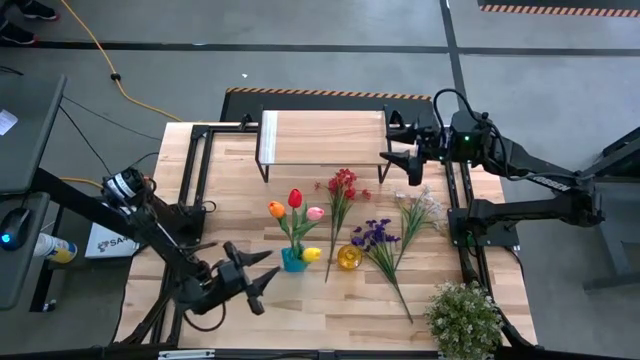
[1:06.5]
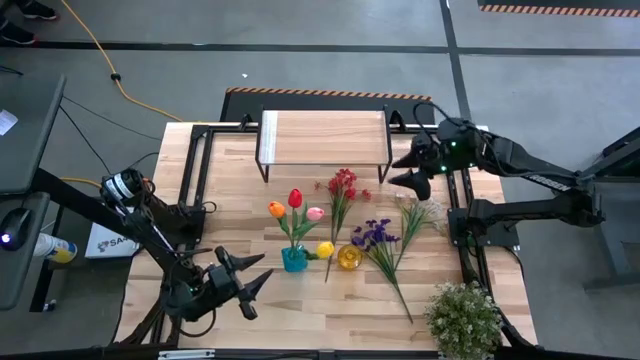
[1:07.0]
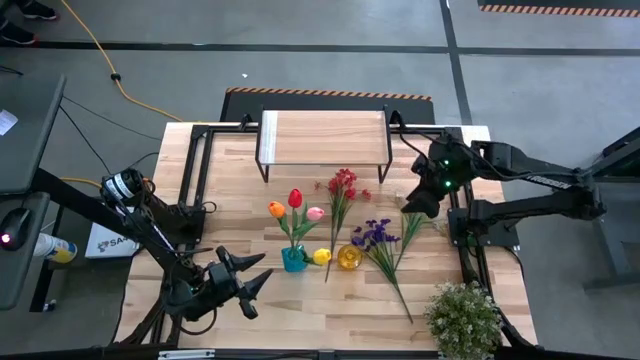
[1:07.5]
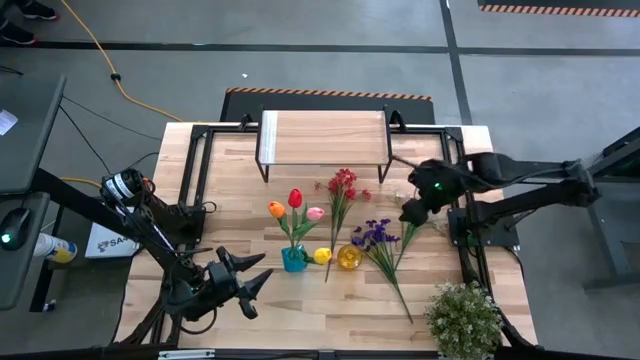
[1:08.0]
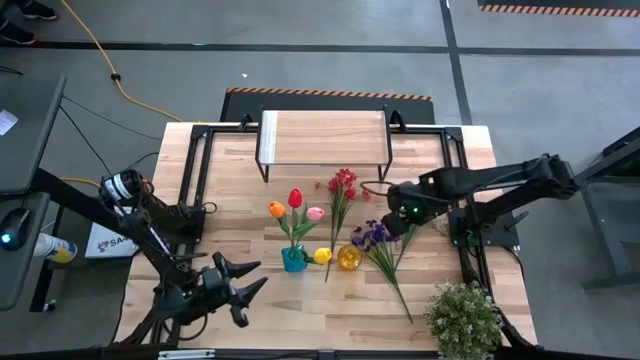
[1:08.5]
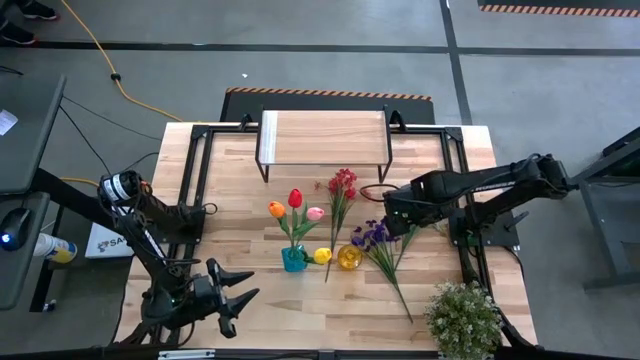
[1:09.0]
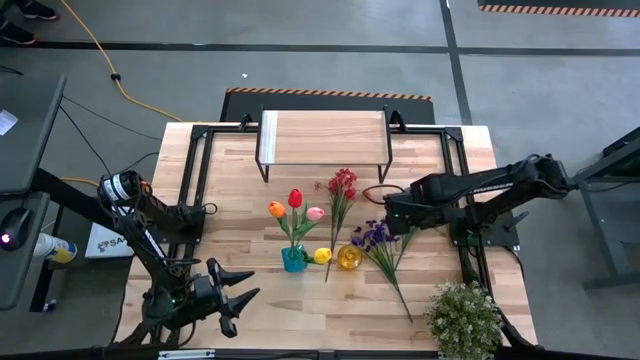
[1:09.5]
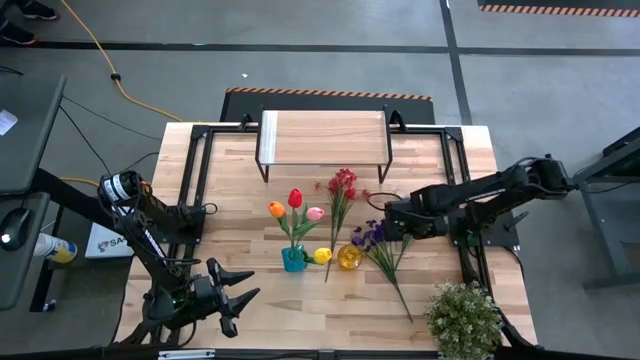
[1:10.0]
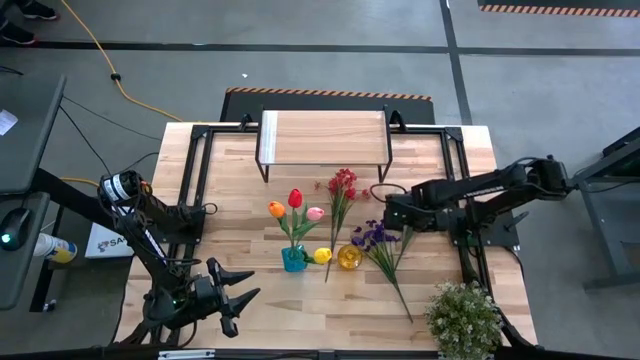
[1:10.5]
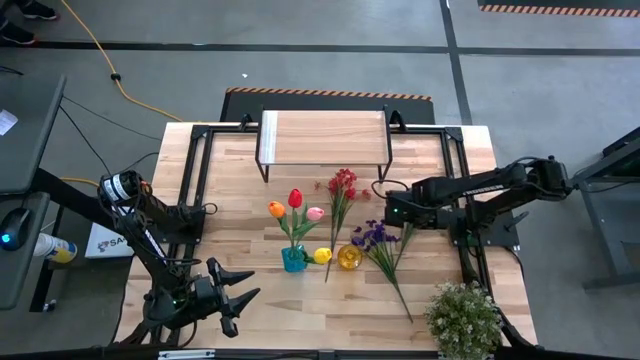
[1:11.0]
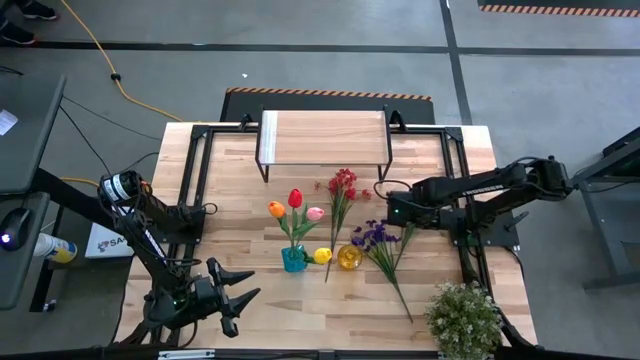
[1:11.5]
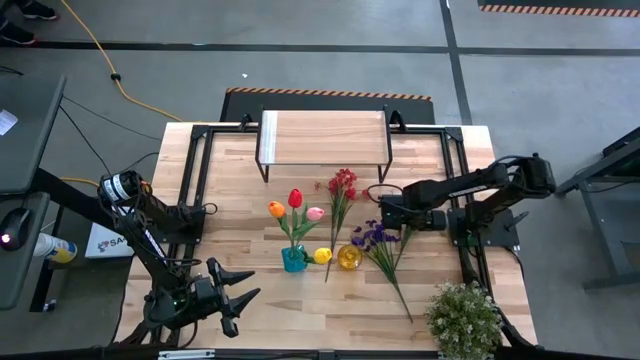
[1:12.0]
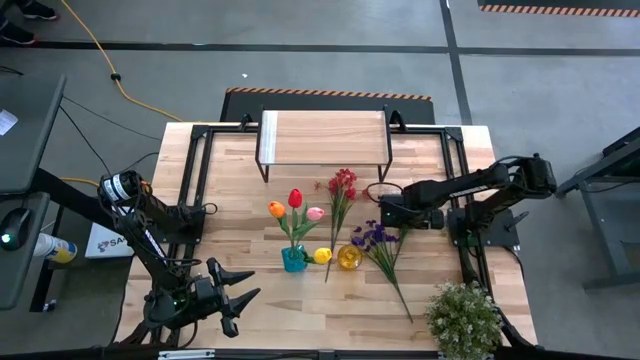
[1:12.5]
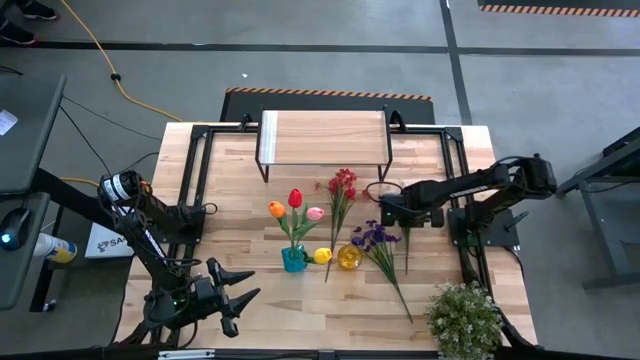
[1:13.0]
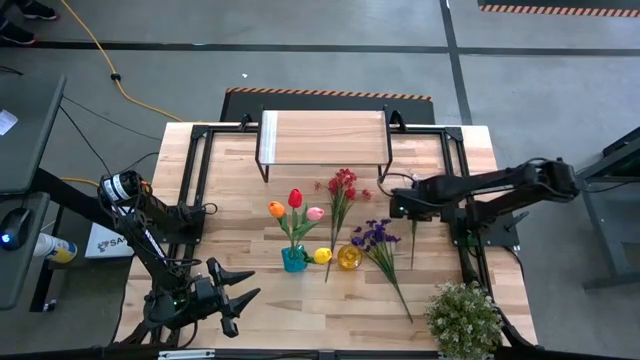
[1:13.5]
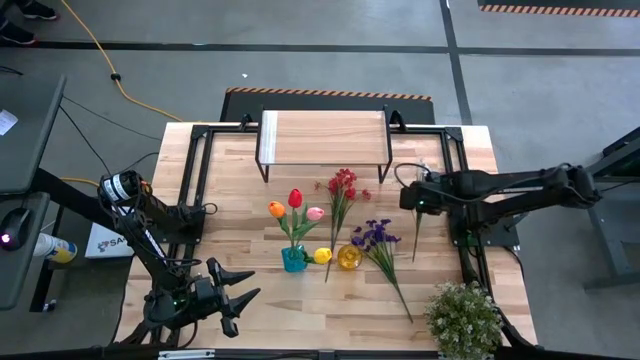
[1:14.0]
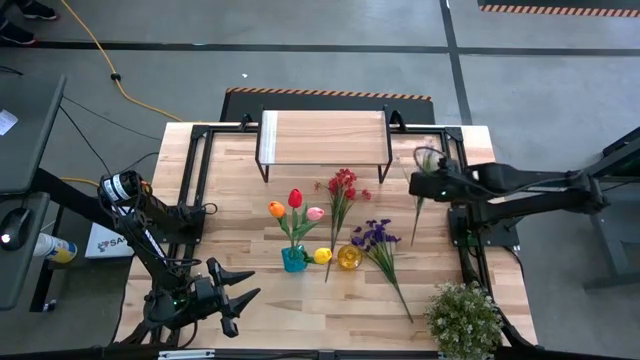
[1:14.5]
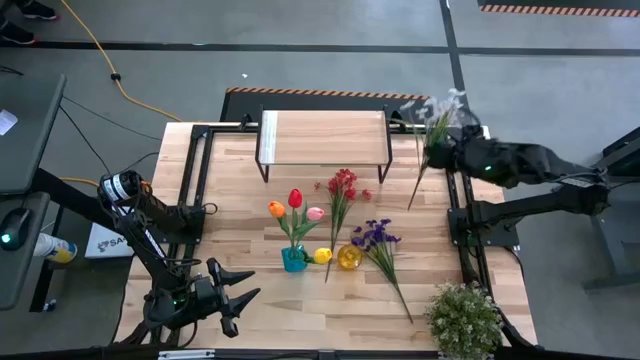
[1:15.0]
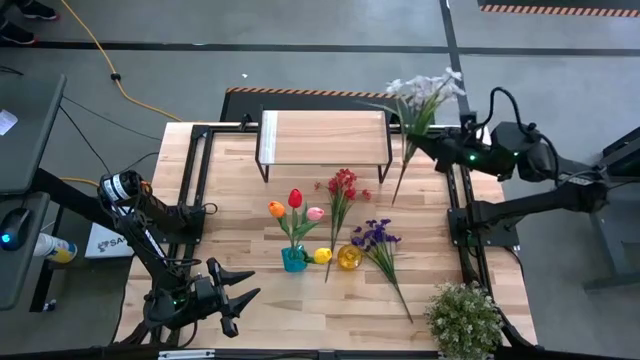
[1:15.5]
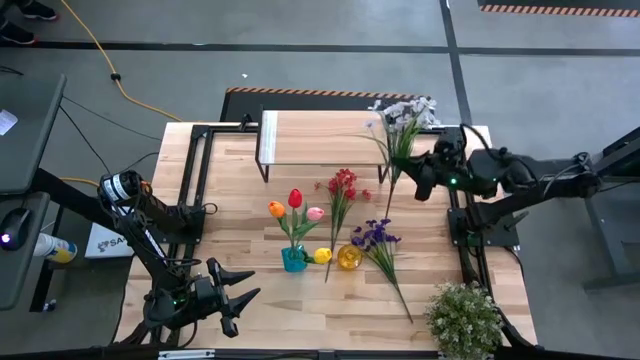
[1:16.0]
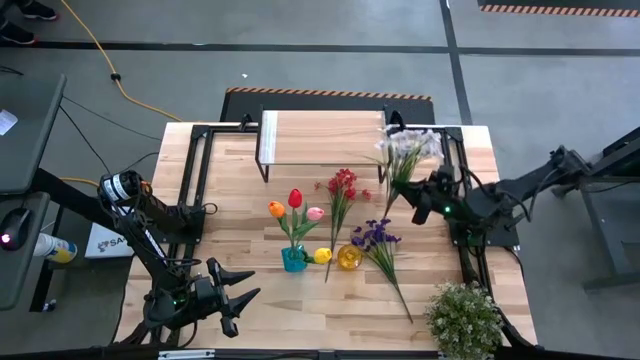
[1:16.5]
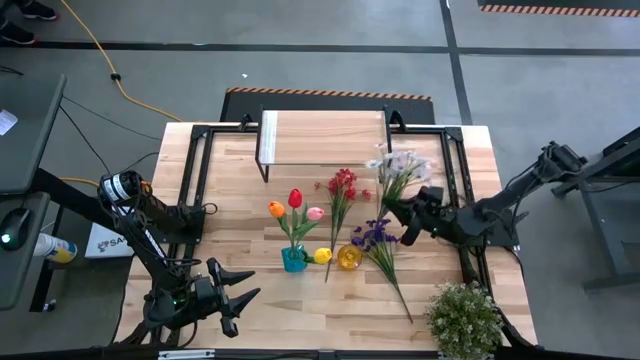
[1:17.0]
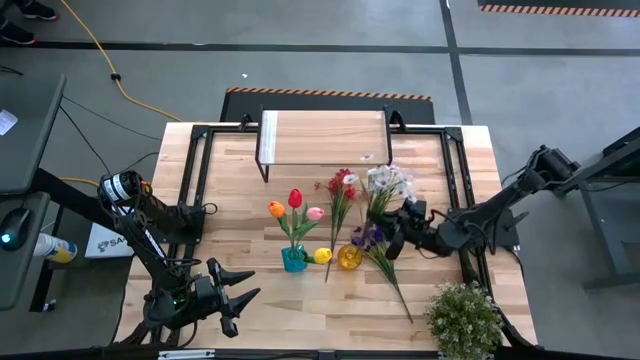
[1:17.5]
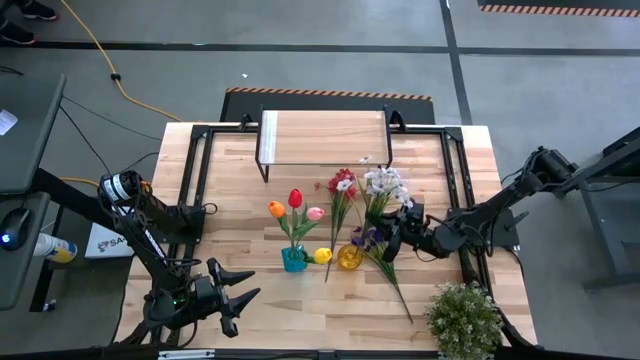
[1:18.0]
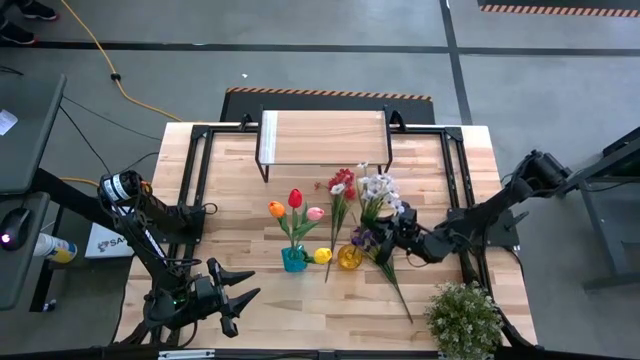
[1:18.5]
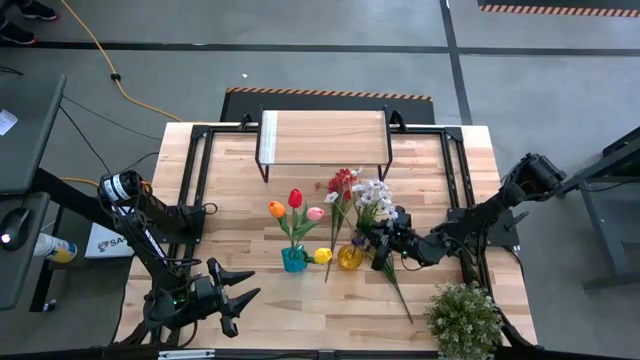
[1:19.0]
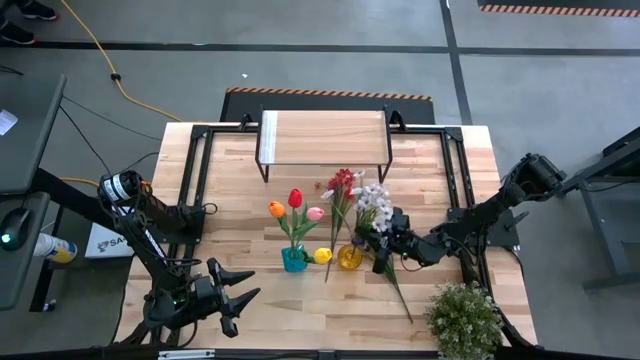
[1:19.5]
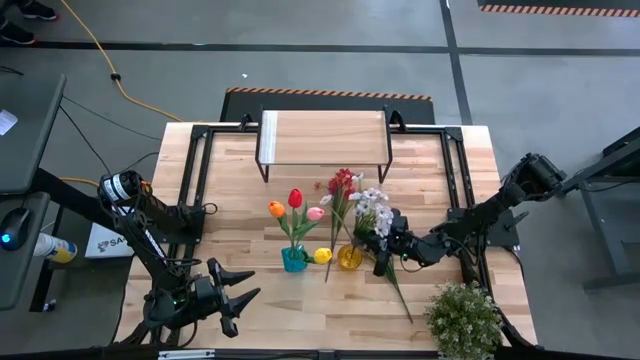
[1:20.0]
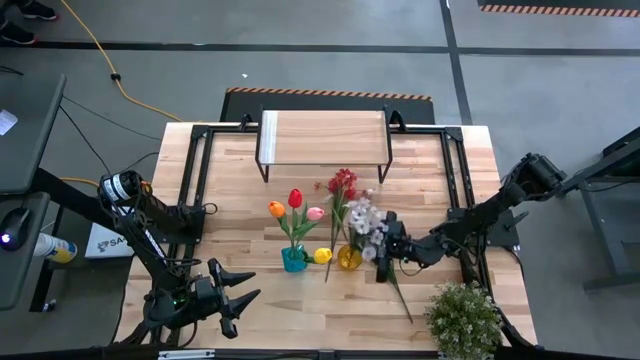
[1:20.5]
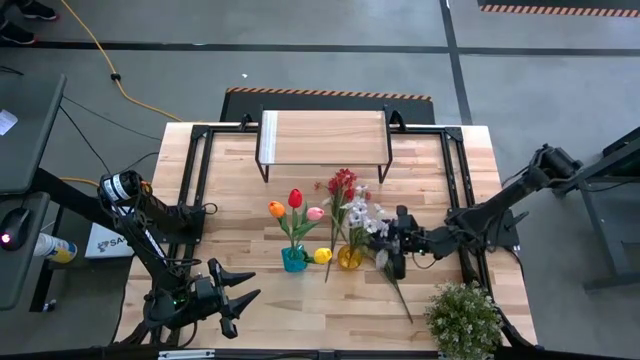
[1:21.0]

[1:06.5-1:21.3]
Task: Pick and place flowers into a vace then onto a shelf
Put the white flowers into the yellow vase

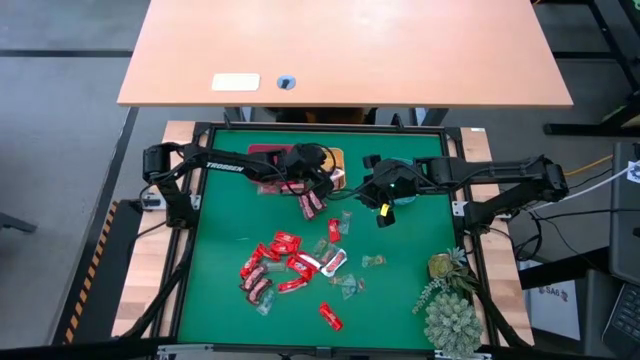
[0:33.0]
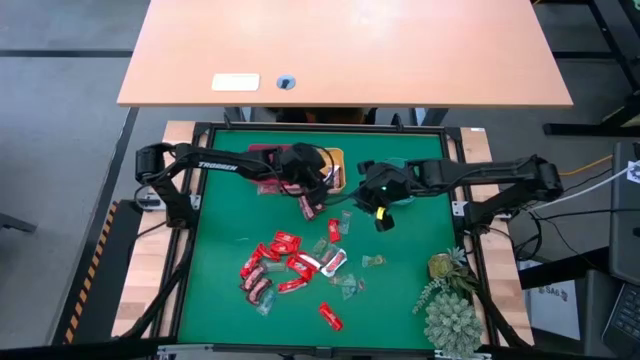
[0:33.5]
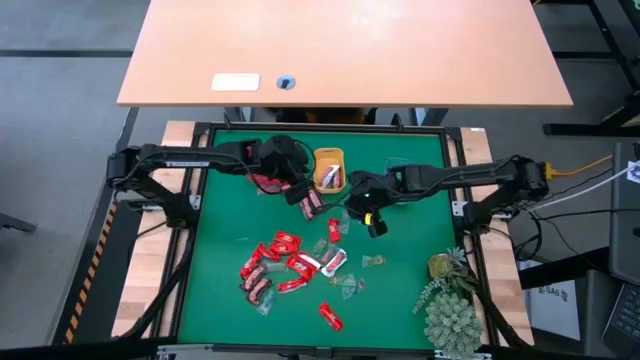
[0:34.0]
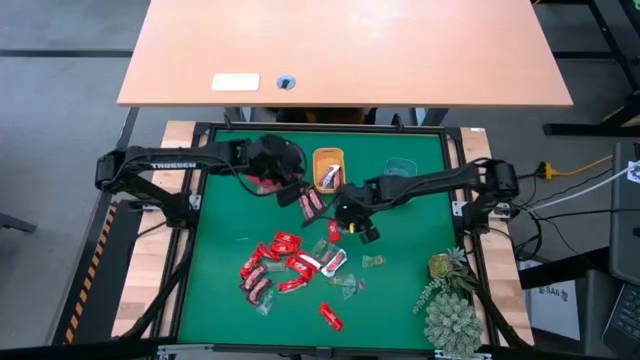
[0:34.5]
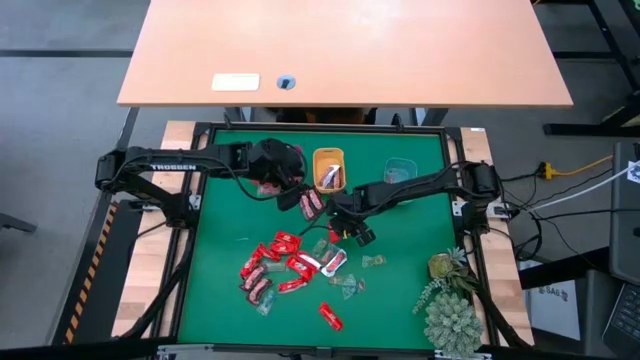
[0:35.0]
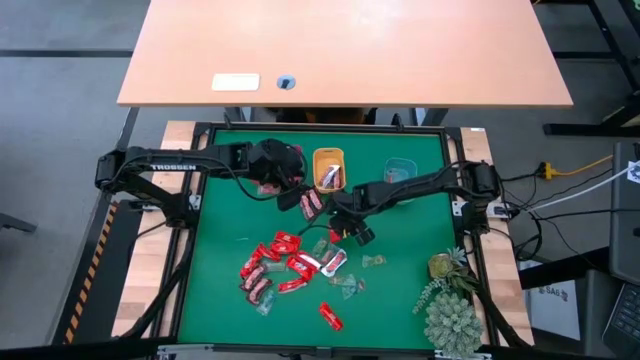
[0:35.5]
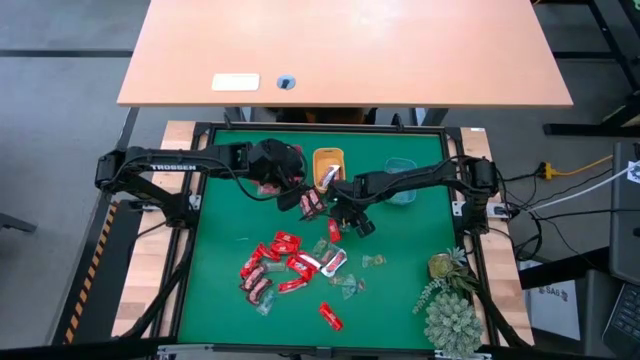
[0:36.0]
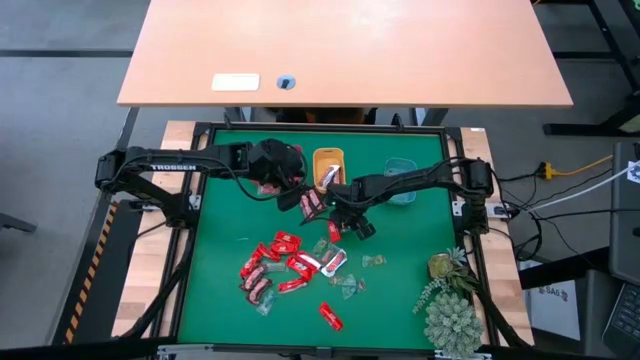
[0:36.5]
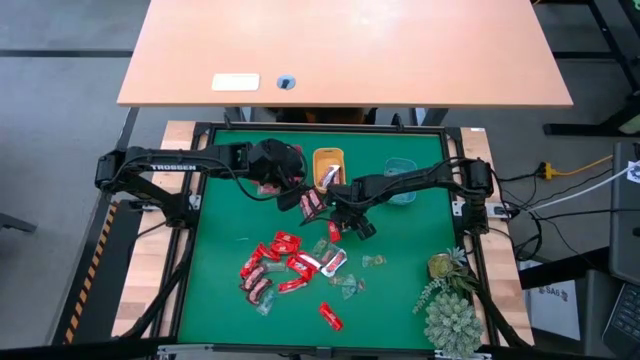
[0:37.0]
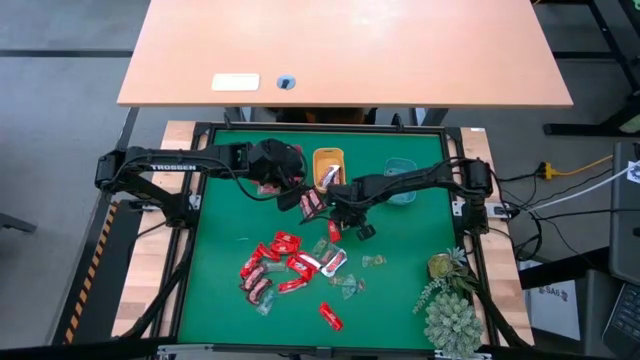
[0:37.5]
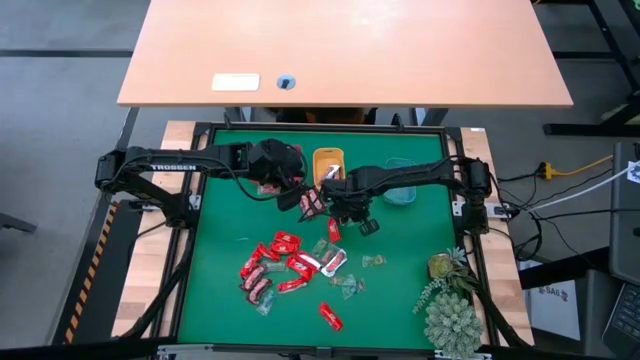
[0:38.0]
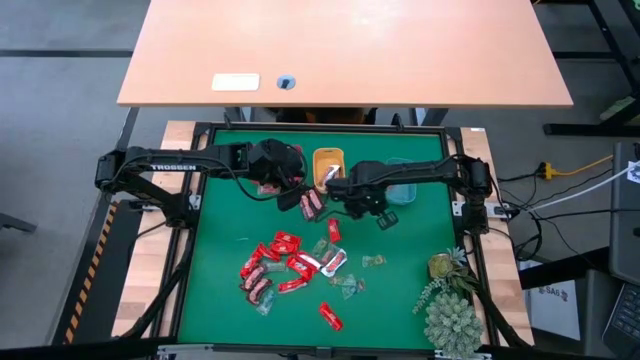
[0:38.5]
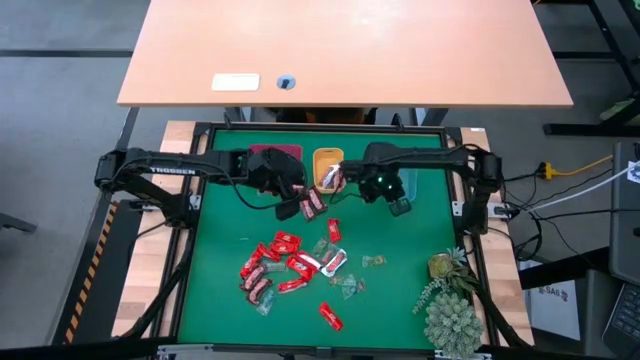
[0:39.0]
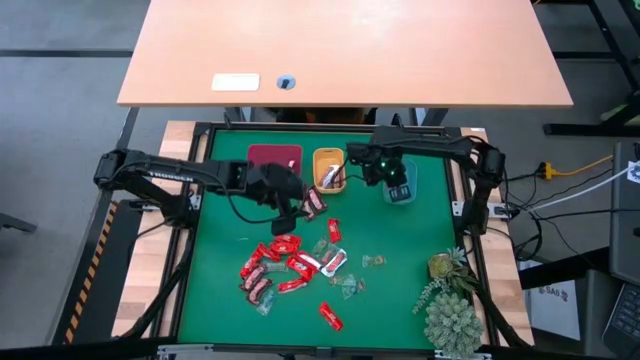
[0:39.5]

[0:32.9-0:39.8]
Task: Sort candy
Put the blue gummy bear into the blue bin
